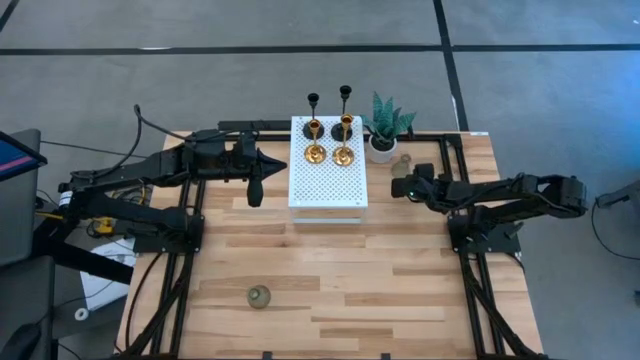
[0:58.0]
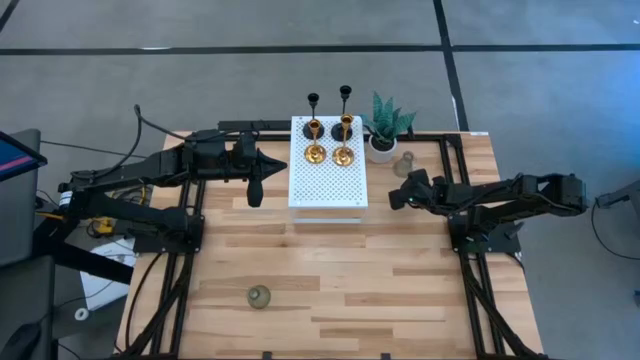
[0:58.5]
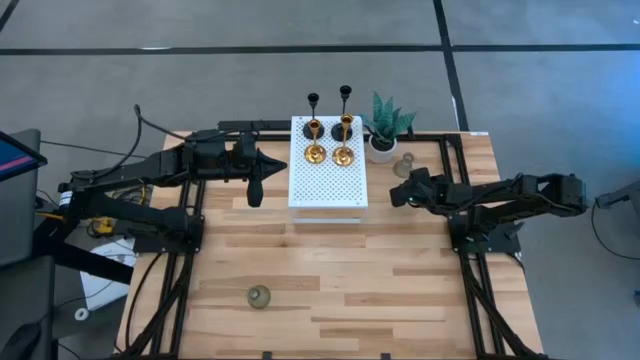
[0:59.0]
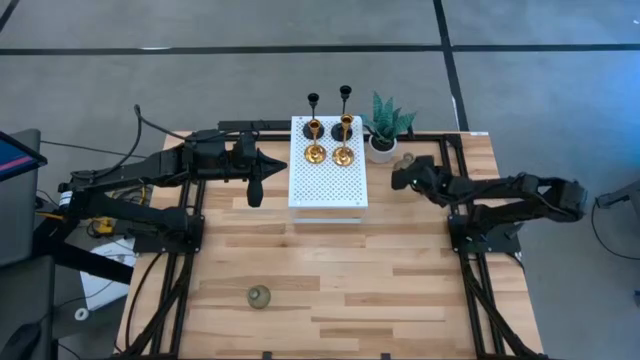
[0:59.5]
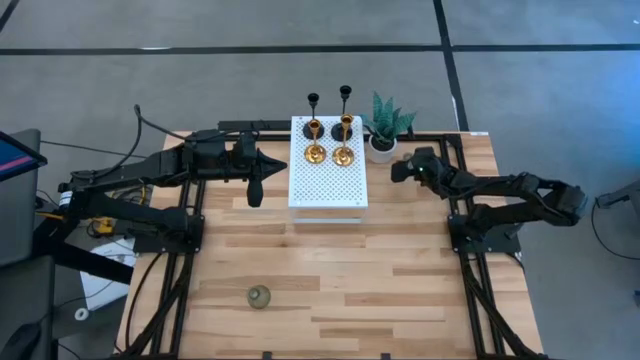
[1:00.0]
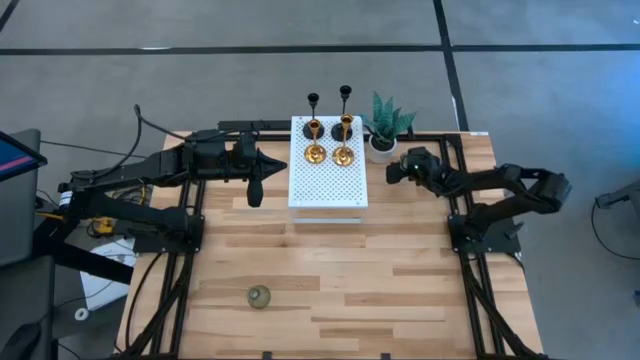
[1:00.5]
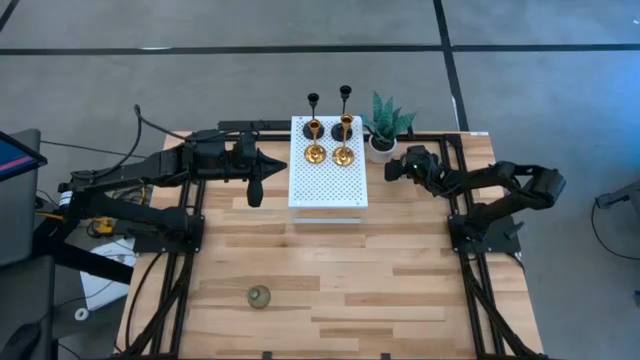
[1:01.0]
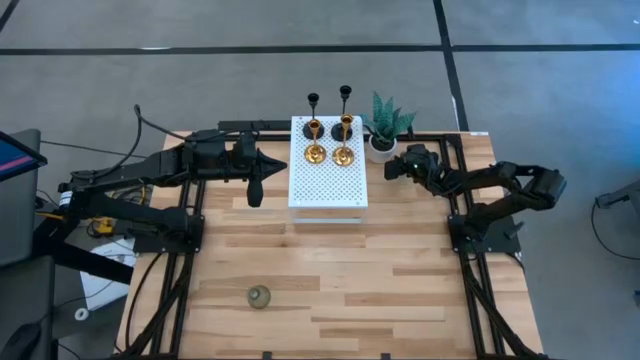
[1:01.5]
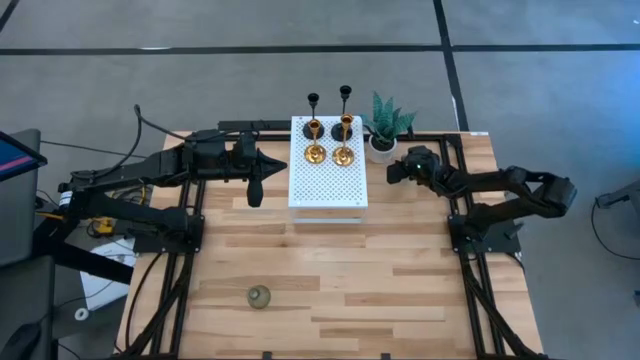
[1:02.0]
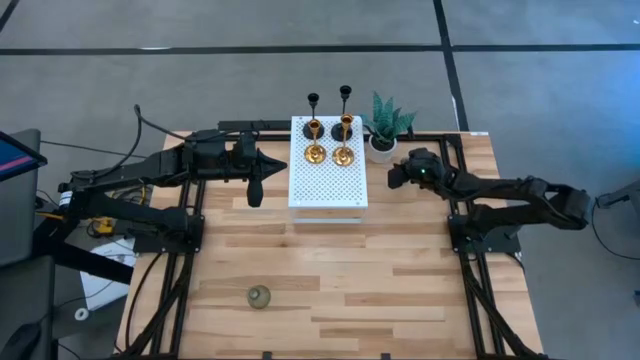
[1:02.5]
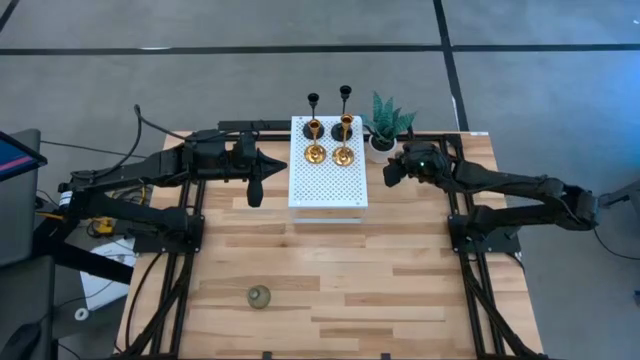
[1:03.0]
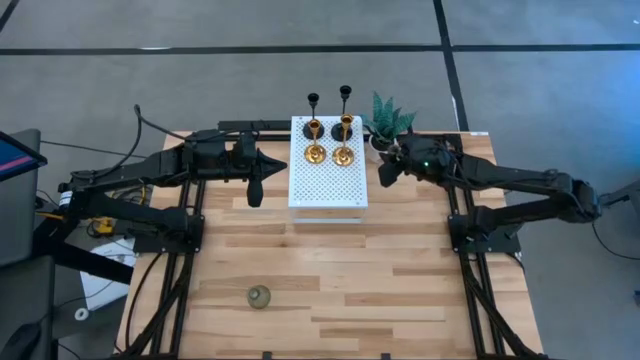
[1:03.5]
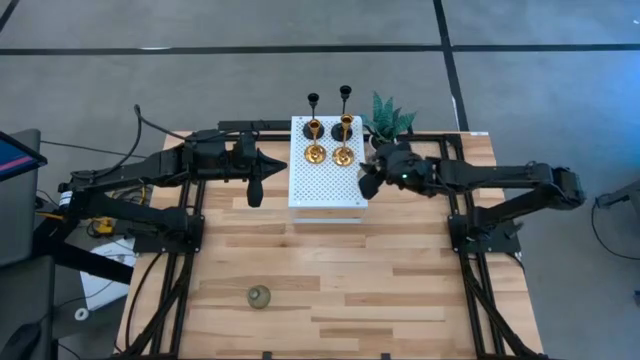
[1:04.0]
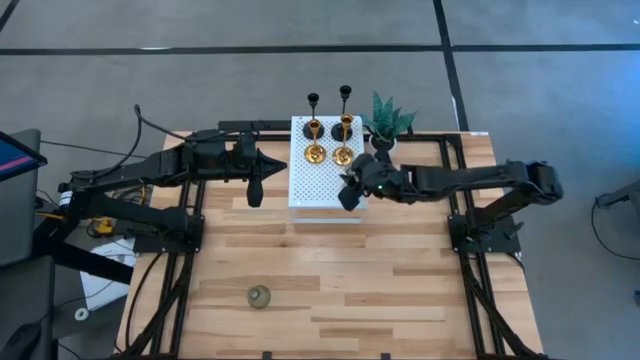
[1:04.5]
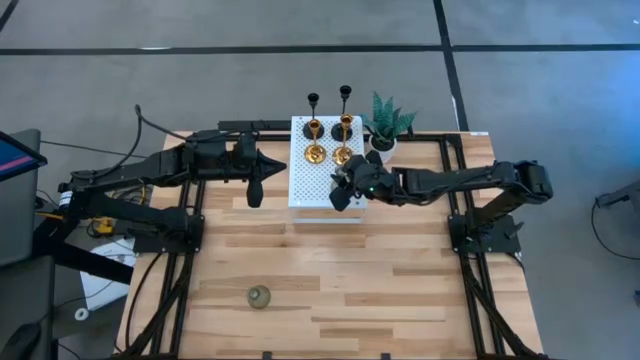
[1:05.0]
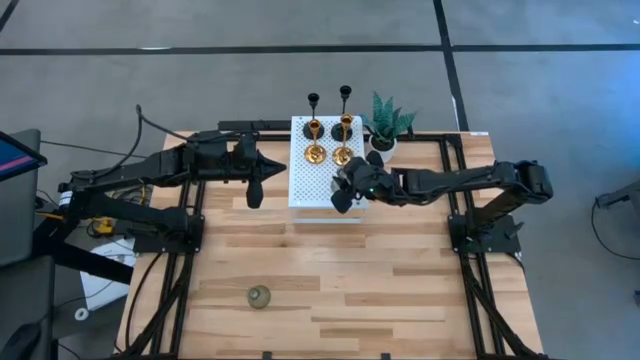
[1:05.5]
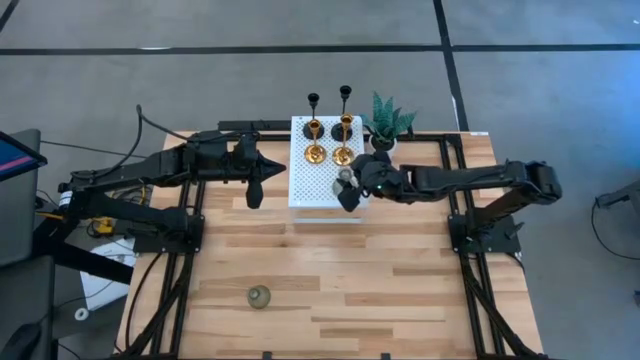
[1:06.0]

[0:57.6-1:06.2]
Task: Pick & Place candle stick holders
Put the top green glass candle holder on the shelf

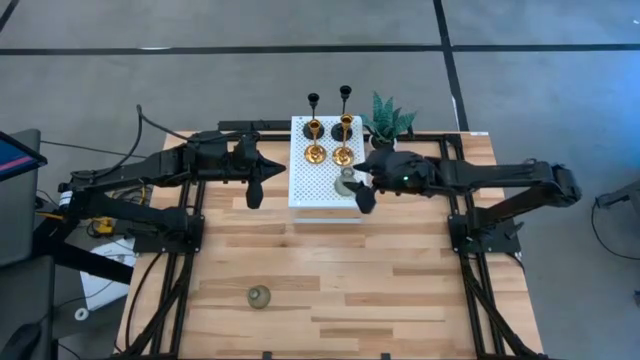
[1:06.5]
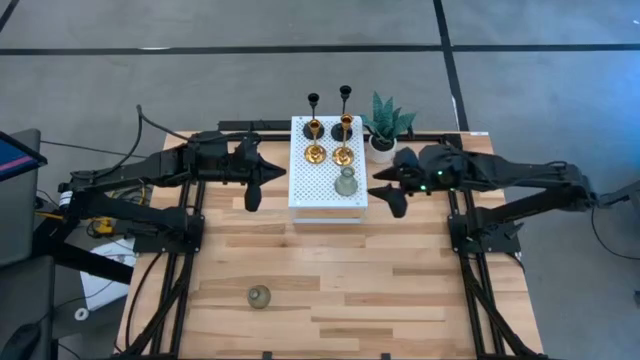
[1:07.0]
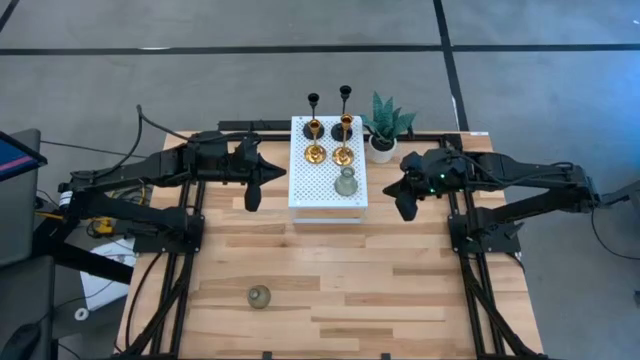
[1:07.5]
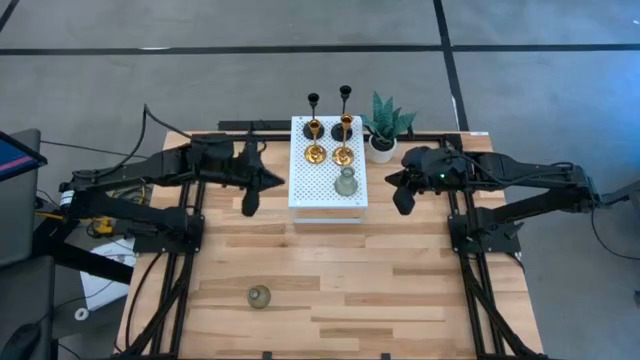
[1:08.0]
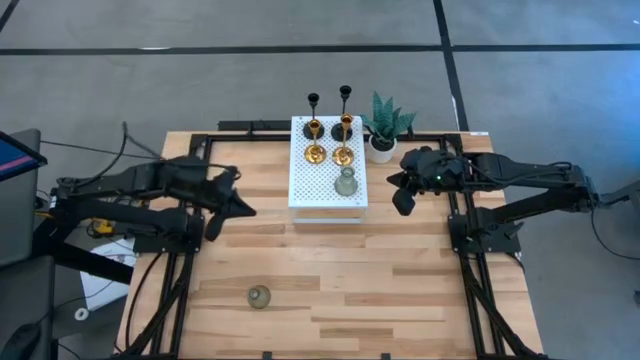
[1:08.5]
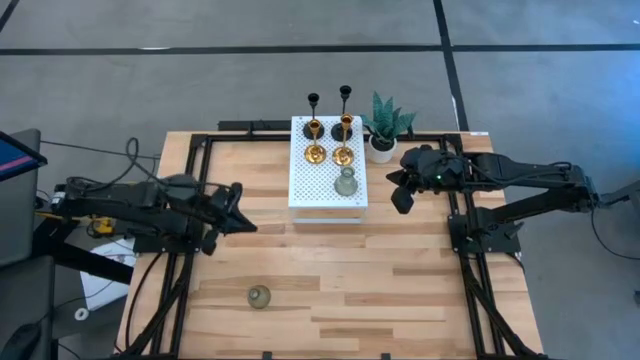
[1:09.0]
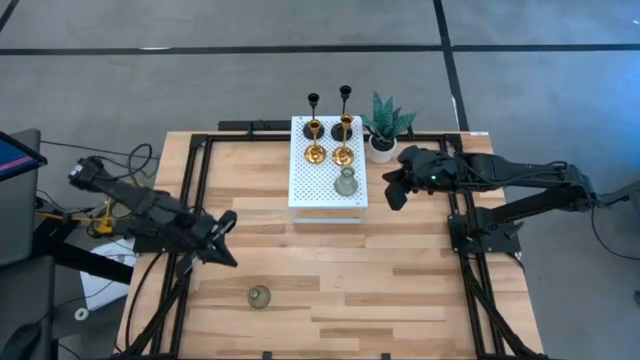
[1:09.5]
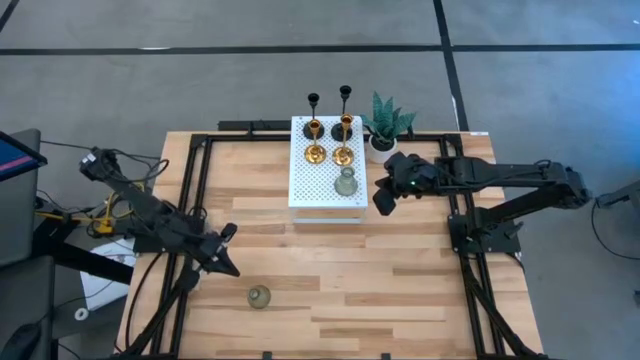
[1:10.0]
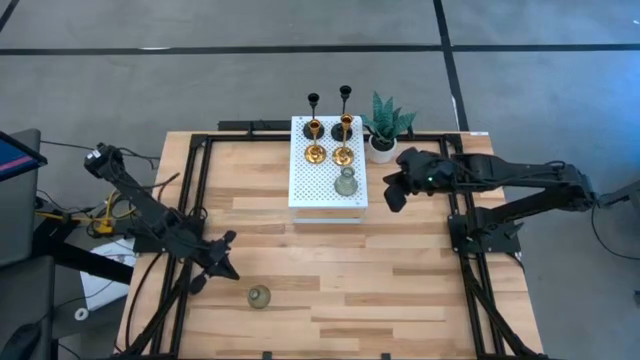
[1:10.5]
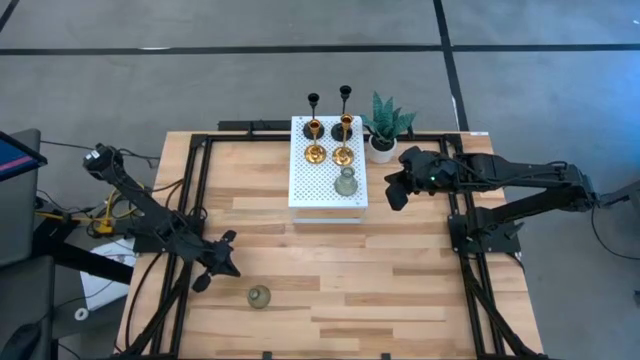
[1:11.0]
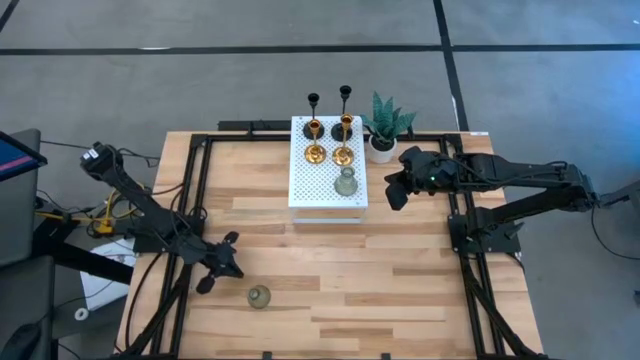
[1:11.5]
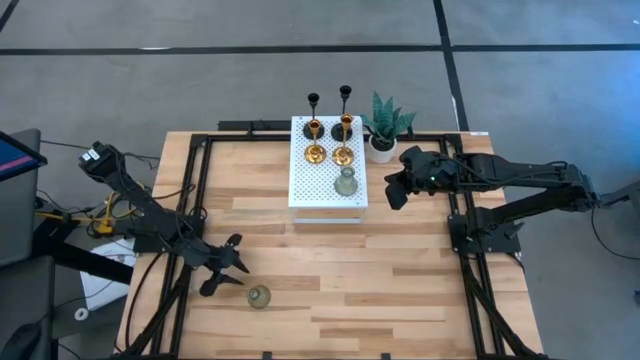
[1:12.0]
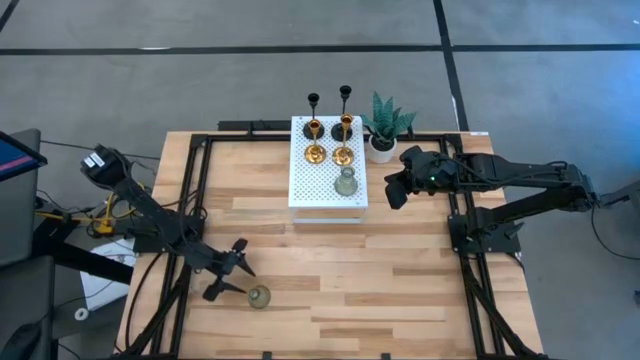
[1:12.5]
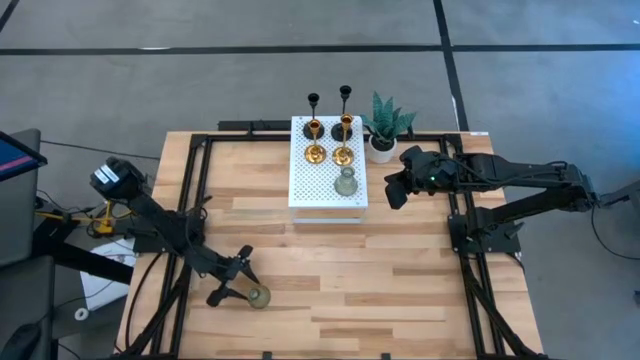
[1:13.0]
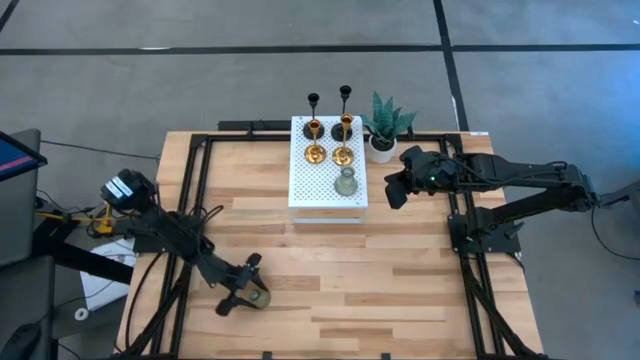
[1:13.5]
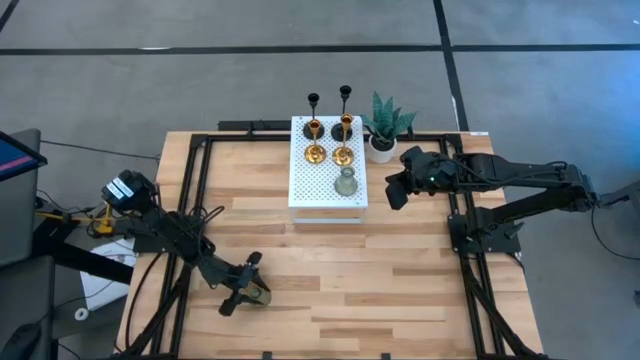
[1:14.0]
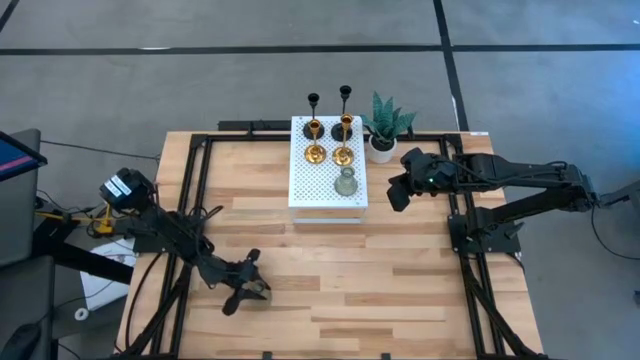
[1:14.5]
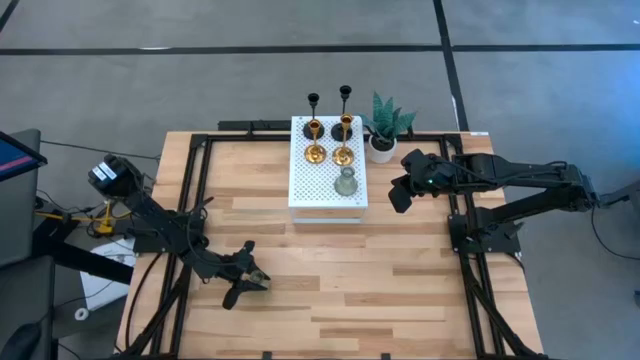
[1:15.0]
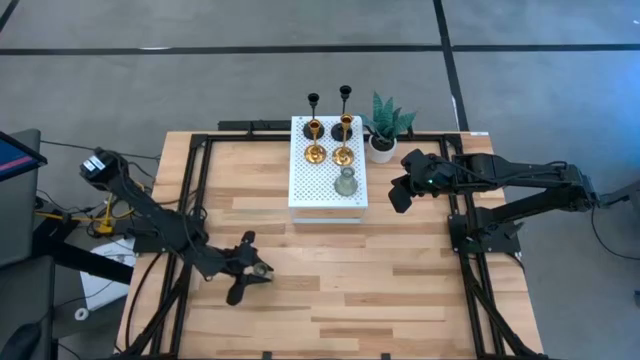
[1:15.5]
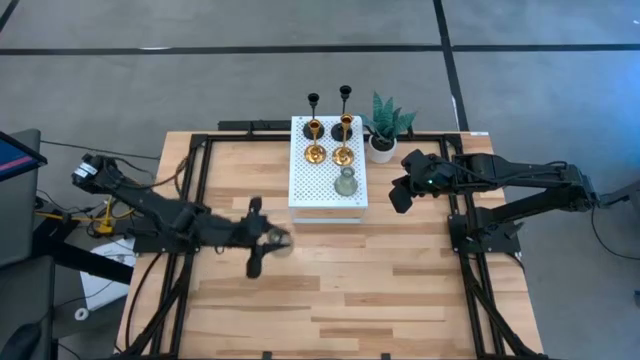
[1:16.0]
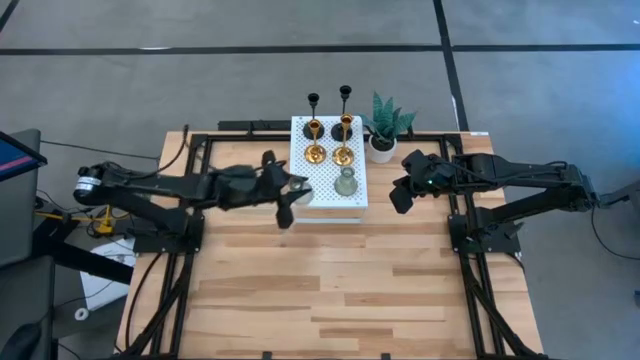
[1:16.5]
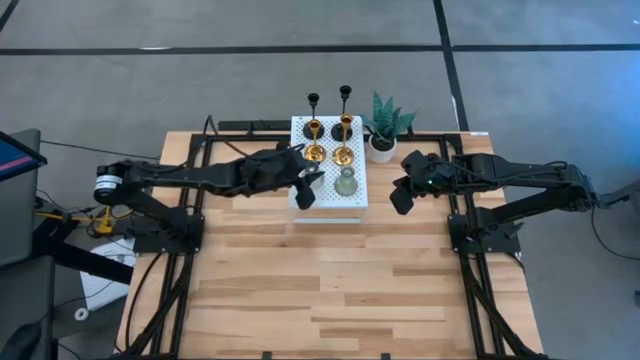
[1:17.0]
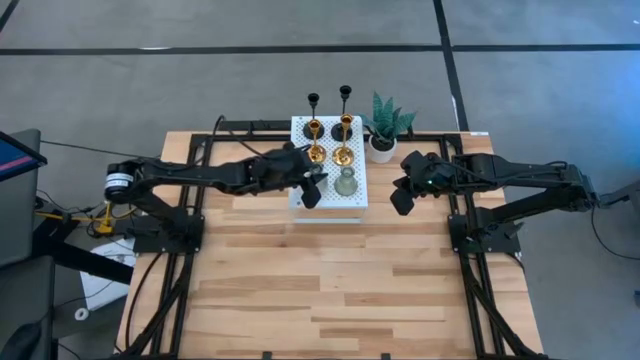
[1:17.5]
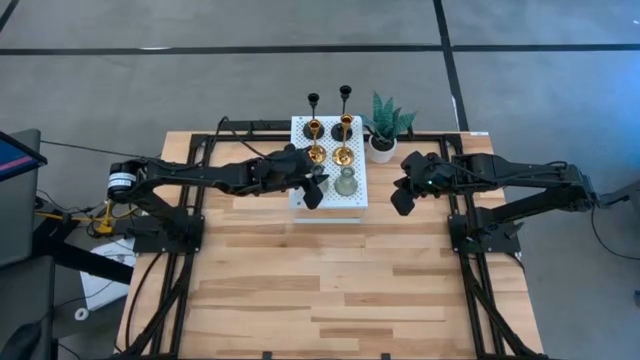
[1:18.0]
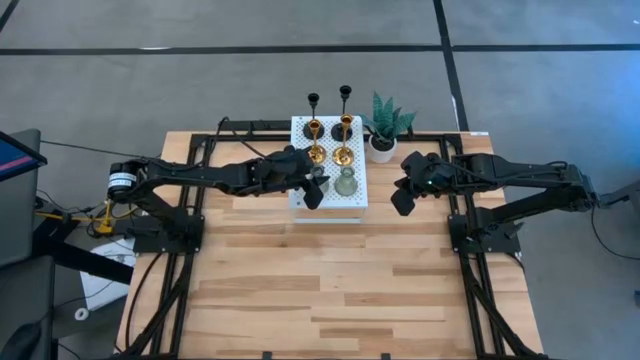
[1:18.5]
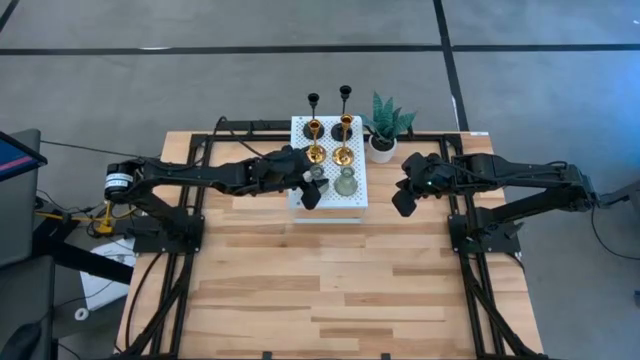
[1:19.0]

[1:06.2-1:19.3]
Align the green glass candle holder with the other green glass candle holder on the shelf
